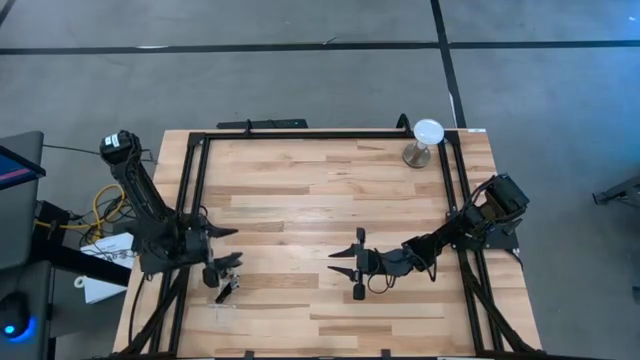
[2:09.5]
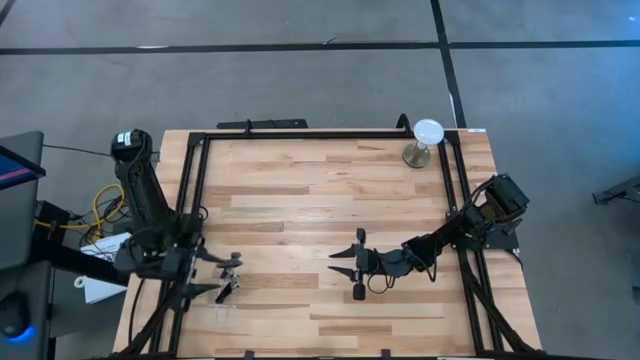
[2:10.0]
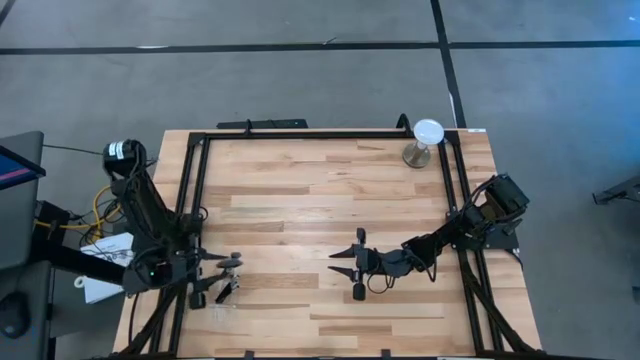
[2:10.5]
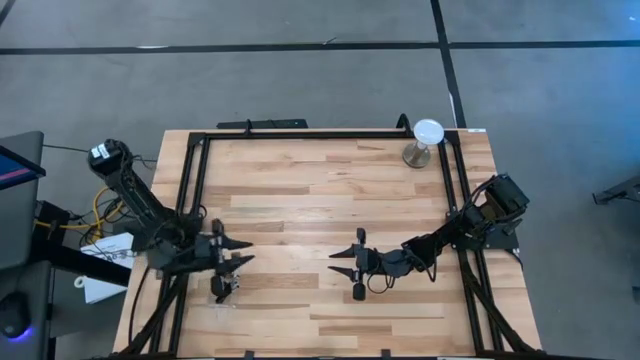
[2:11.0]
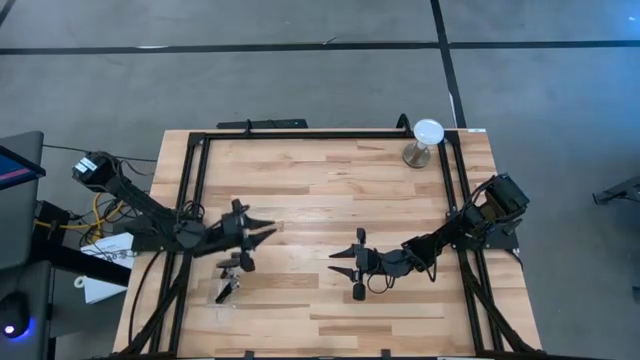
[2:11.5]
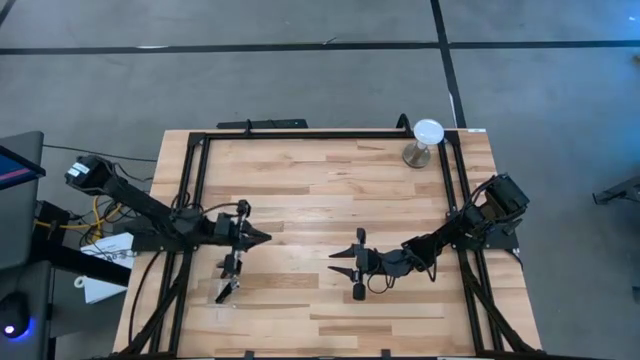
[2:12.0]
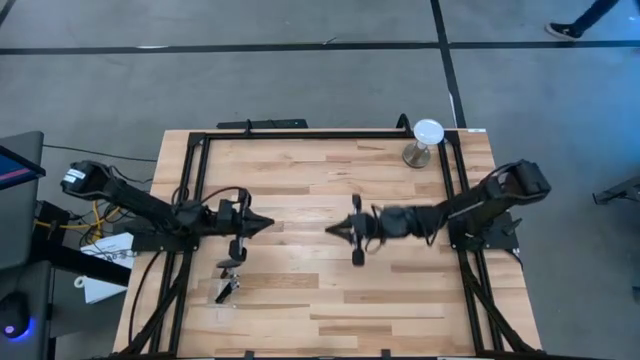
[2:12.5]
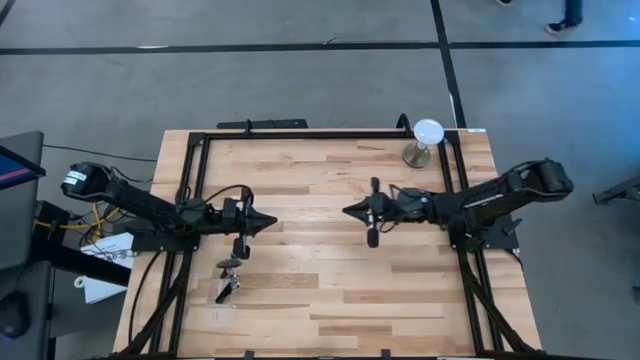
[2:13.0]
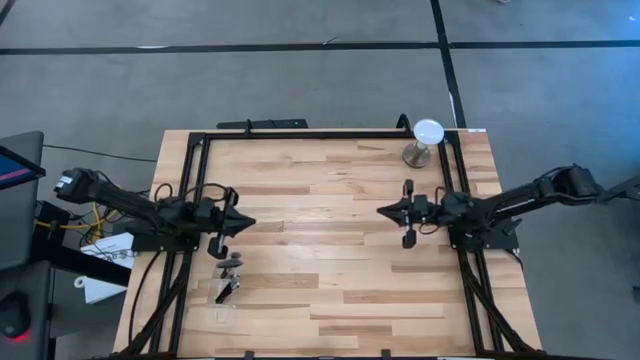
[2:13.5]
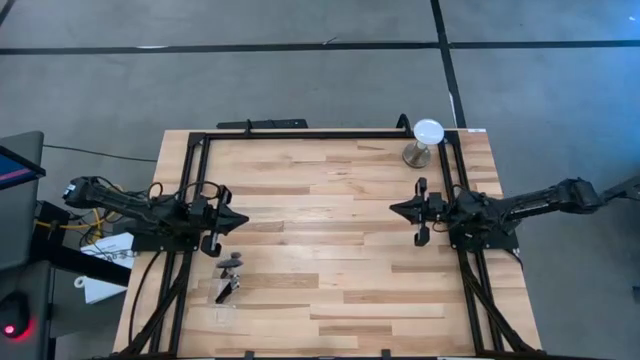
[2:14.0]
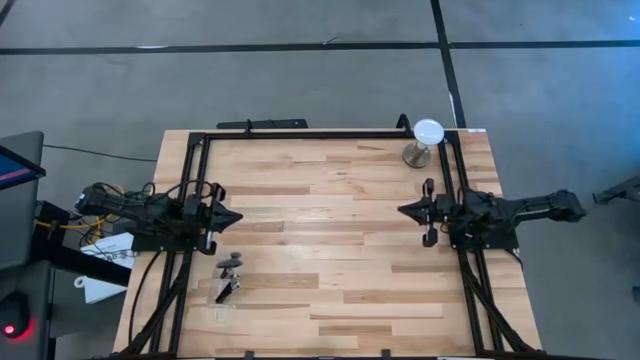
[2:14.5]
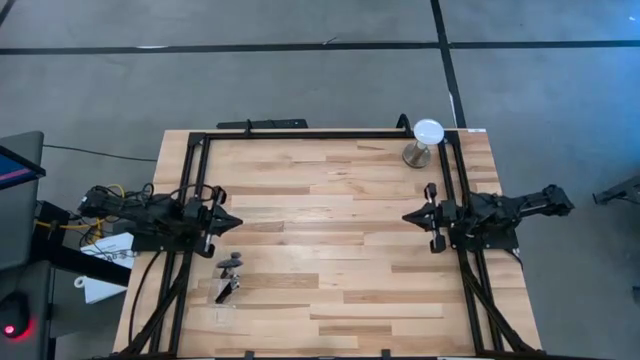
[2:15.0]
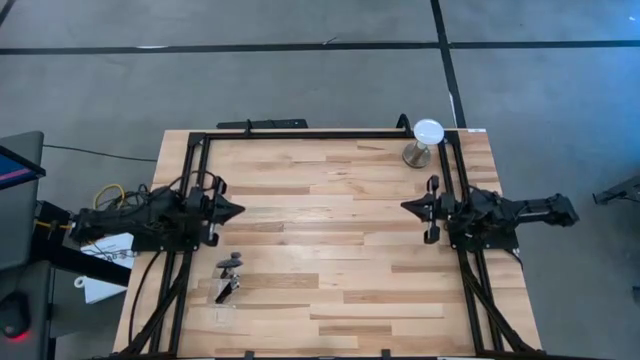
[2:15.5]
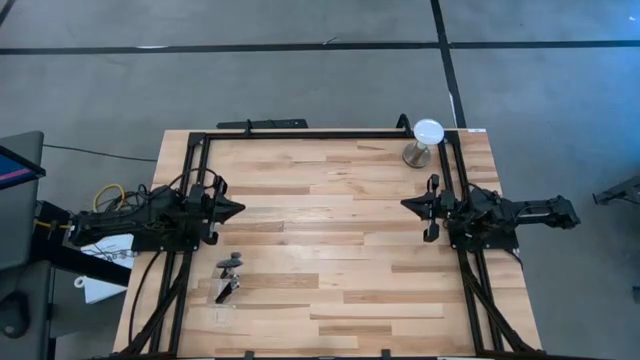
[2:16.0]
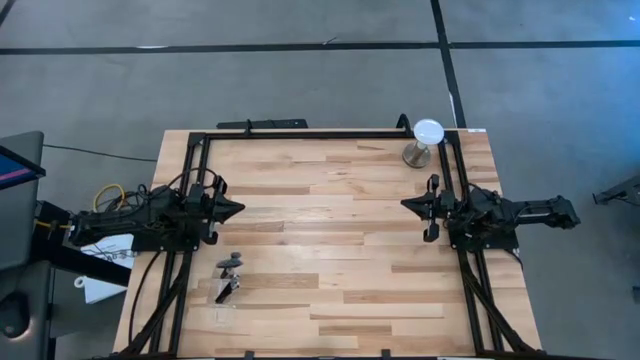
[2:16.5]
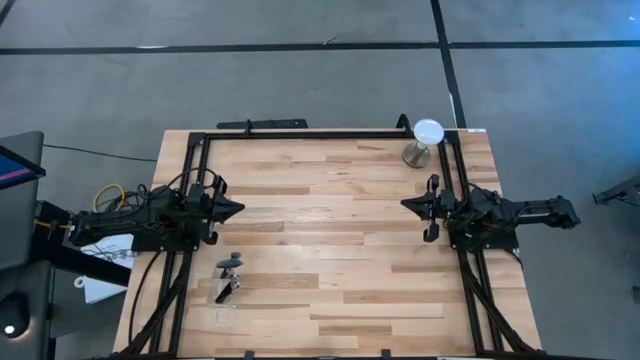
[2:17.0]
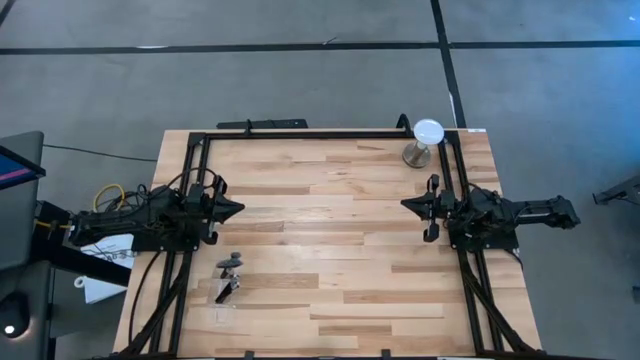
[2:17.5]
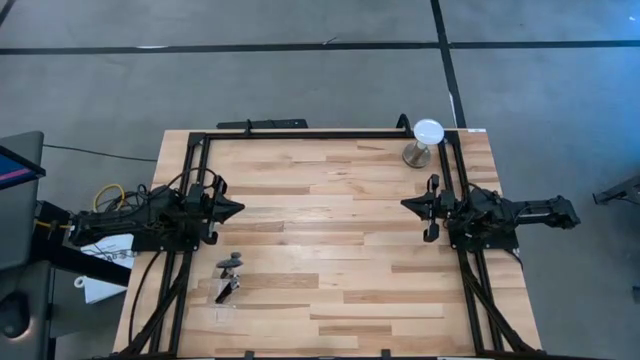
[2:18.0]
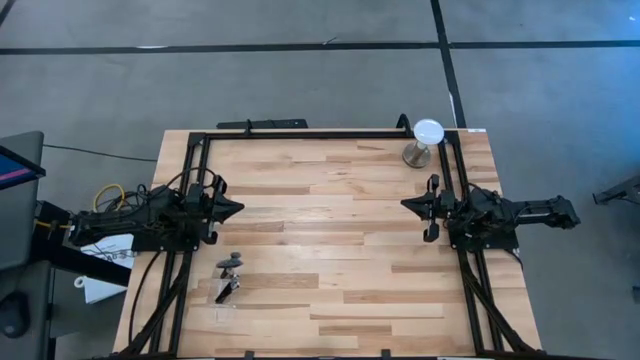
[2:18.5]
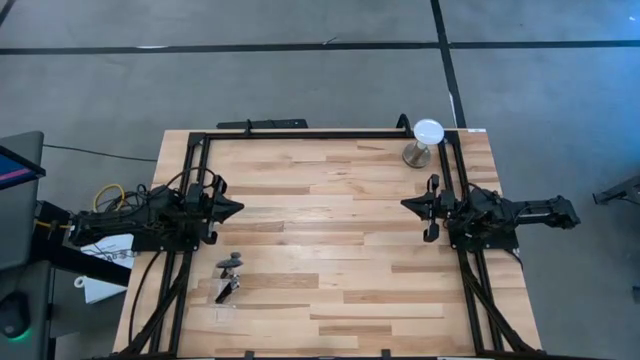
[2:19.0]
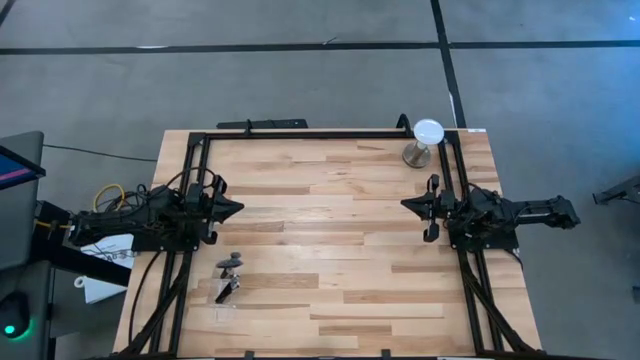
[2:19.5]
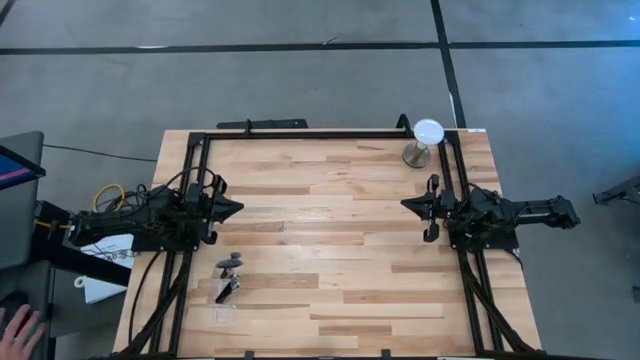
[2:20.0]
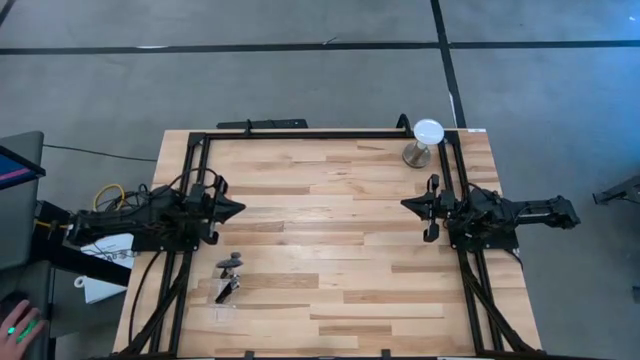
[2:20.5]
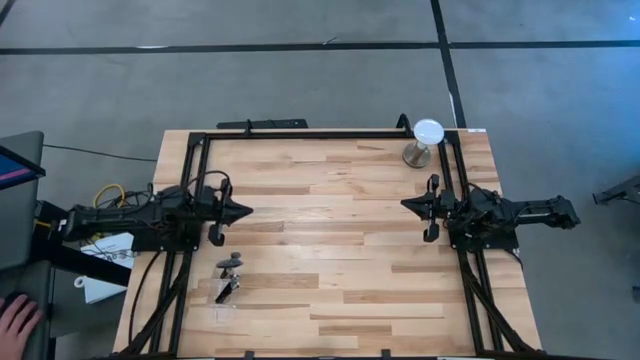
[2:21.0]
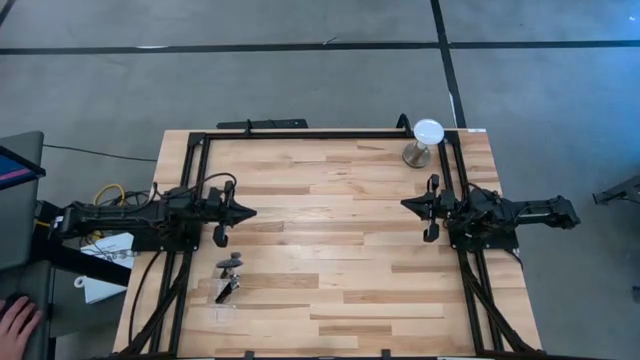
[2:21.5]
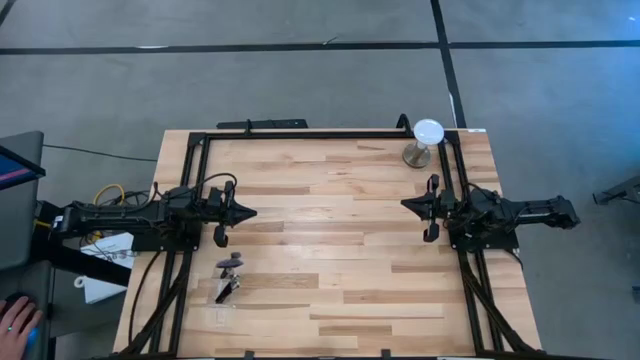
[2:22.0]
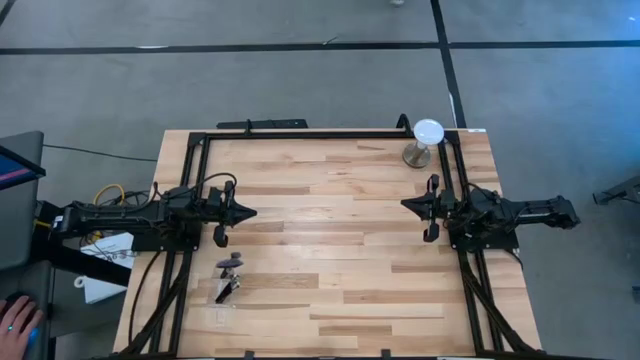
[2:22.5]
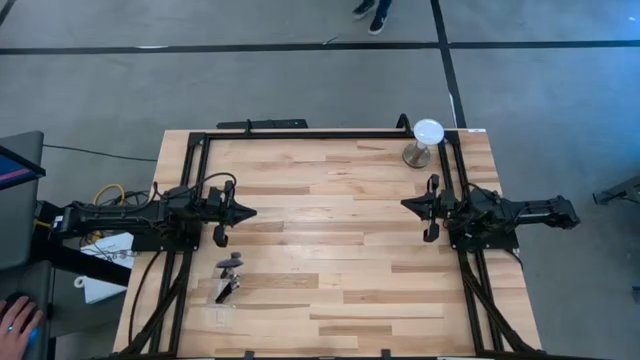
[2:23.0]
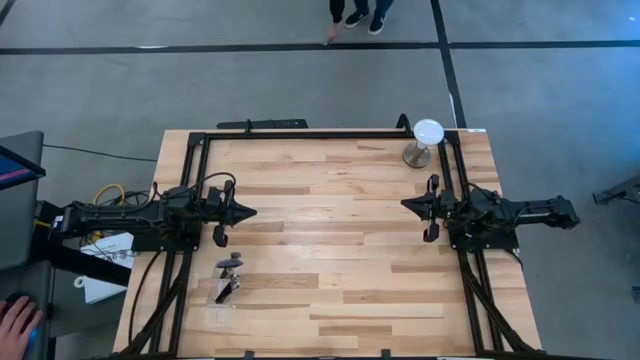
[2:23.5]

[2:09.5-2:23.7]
Task: Put items in baskets/containers
Return to home position

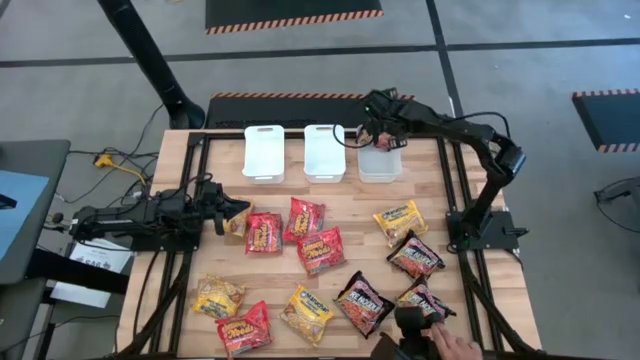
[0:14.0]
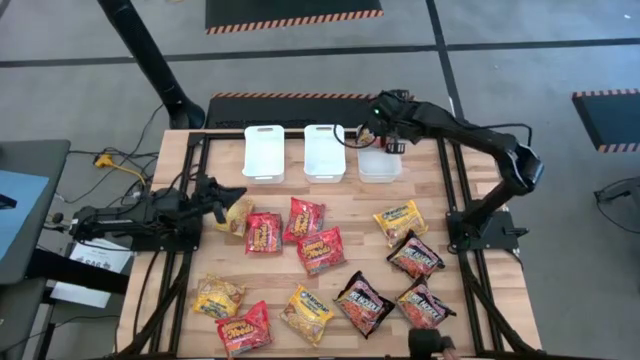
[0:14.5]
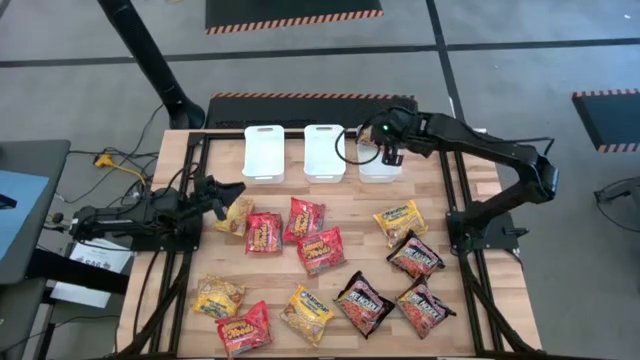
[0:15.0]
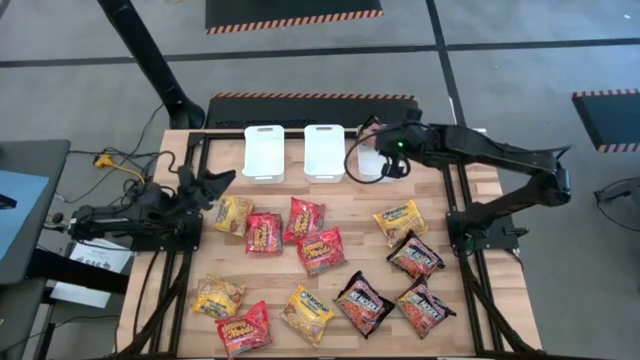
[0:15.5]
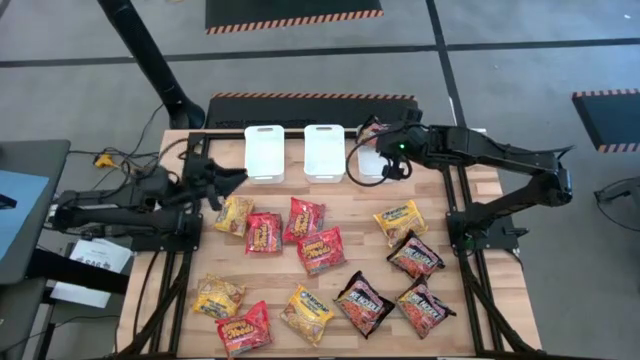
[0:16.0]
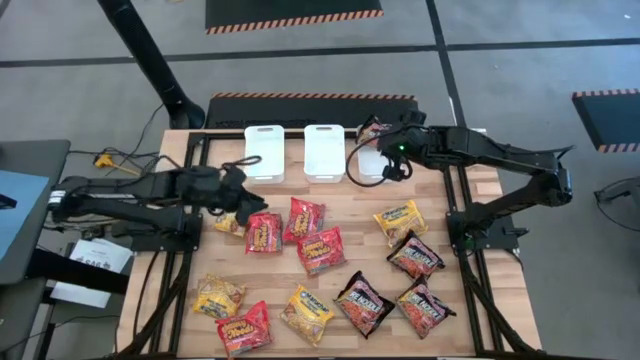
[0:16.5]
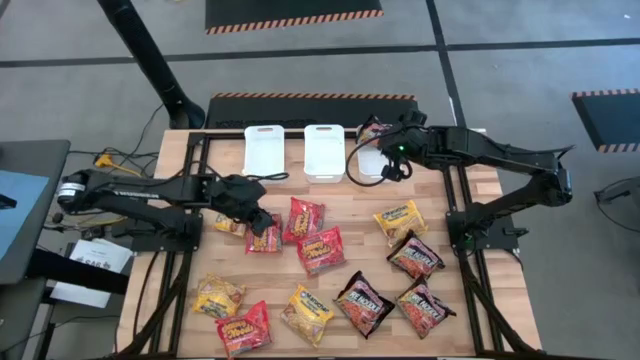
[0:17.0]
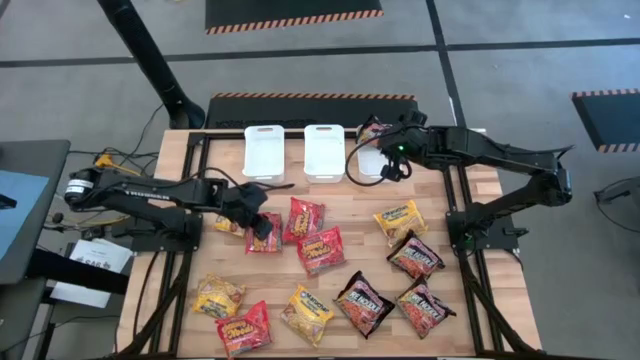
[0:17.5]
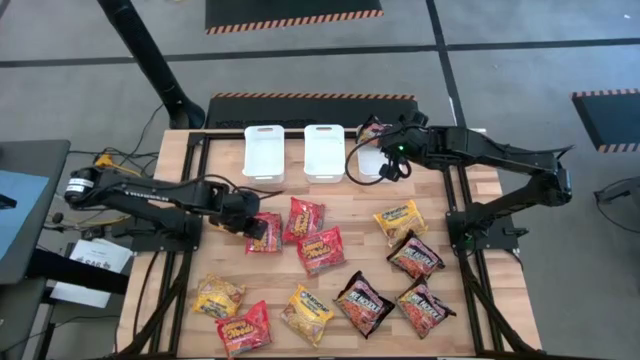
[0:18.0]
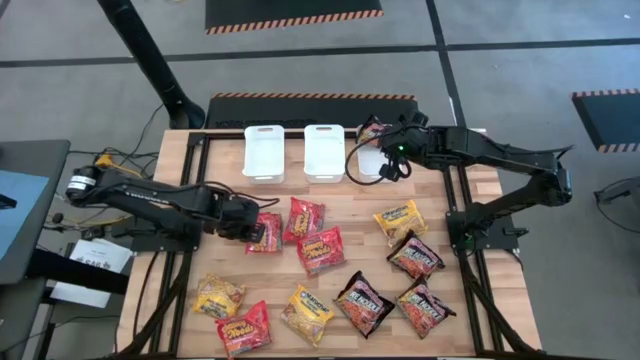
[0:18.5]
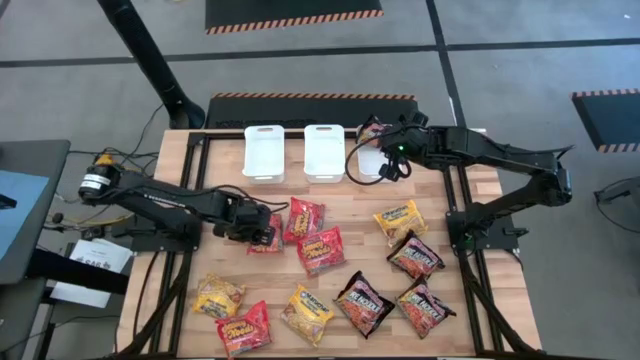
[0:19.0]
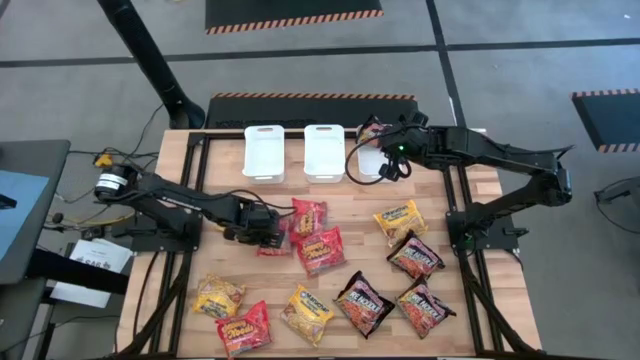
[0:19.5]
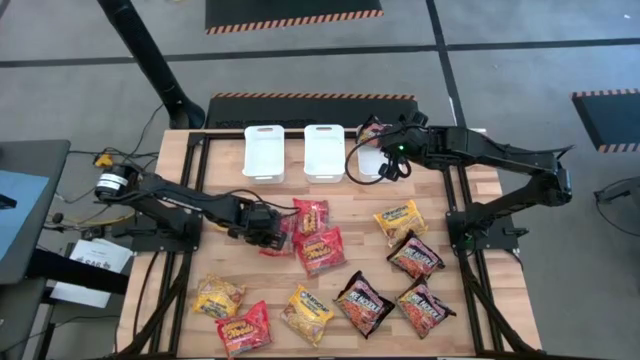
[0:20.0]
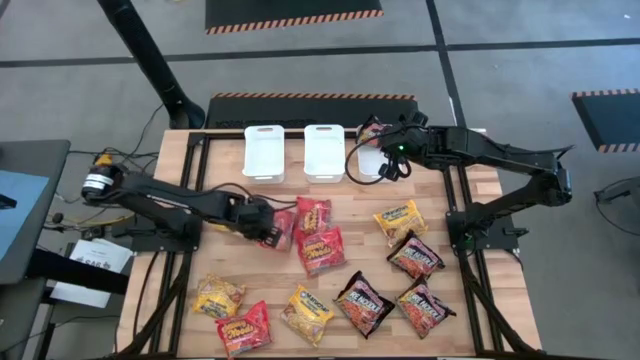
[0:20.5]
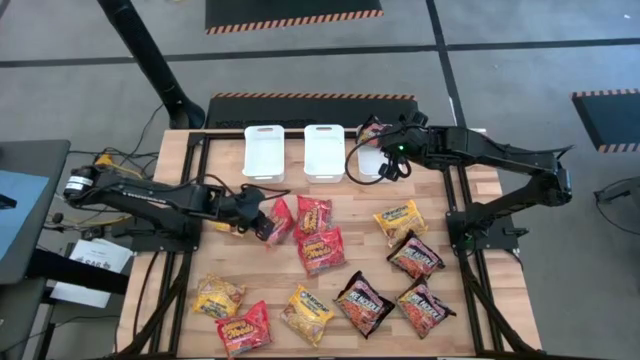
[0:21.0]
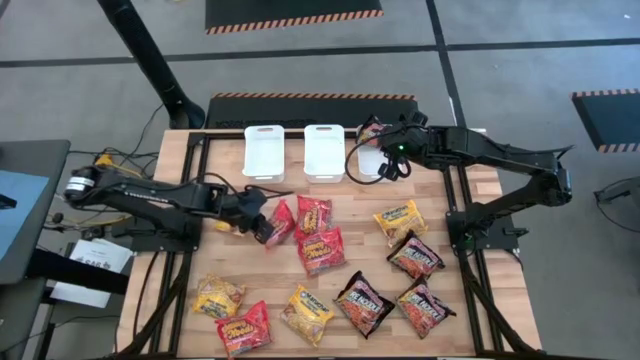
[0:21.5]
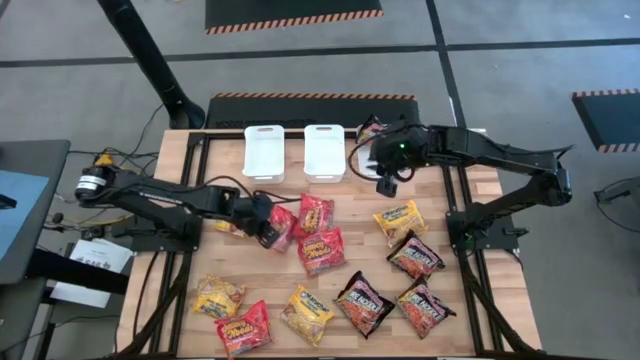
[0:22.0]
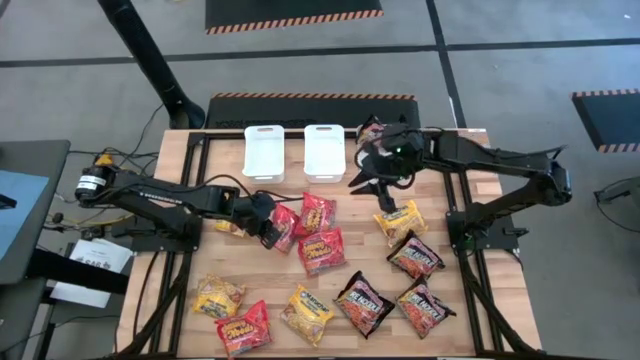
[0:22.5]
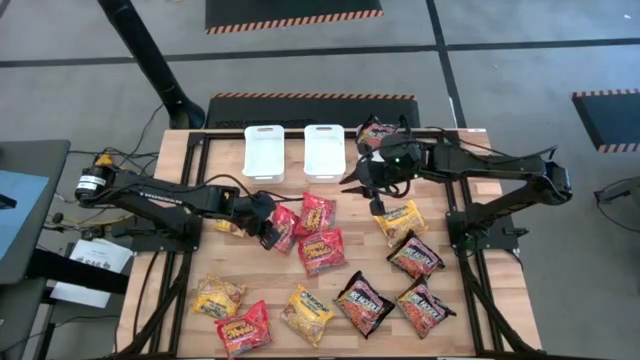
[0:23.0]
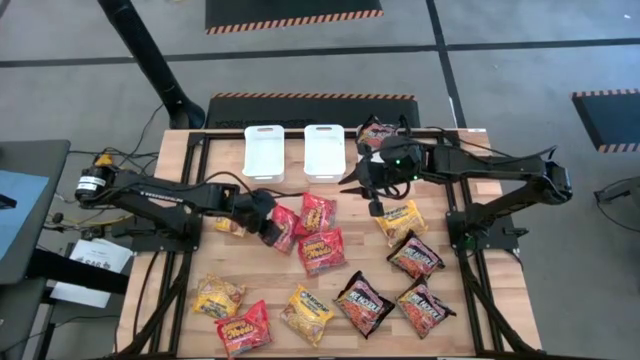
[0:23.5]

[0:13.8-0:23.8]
Task: Sort Maruchan noodles
Put the orange noodle pack into the left white bin
